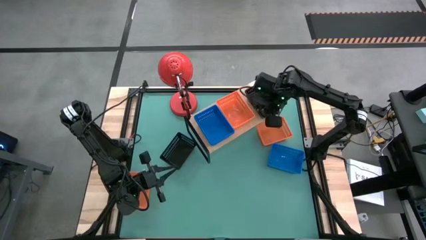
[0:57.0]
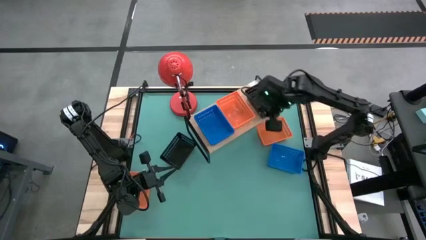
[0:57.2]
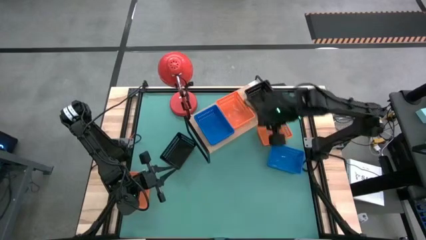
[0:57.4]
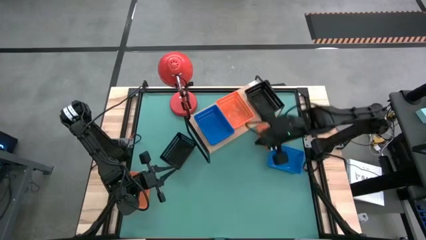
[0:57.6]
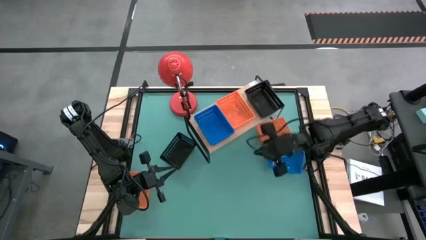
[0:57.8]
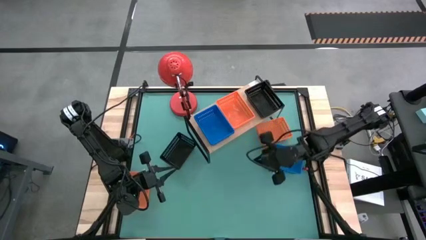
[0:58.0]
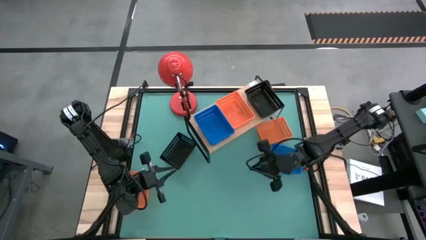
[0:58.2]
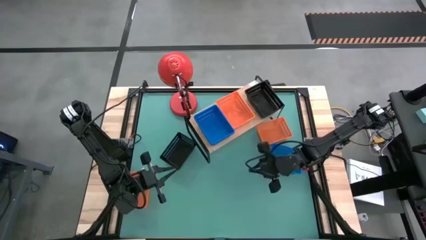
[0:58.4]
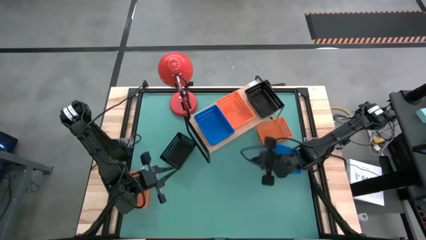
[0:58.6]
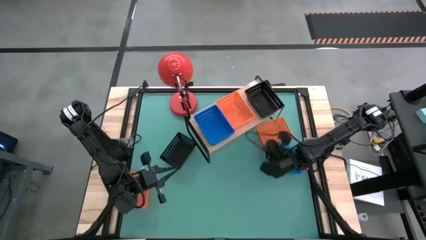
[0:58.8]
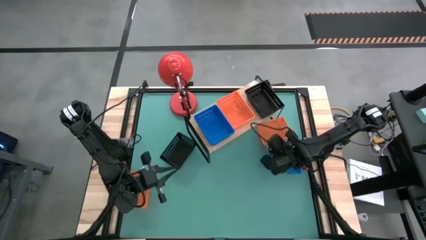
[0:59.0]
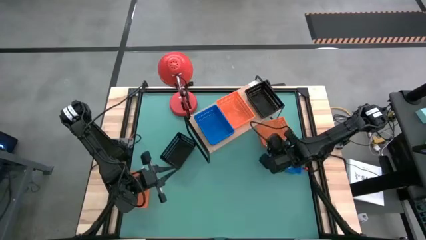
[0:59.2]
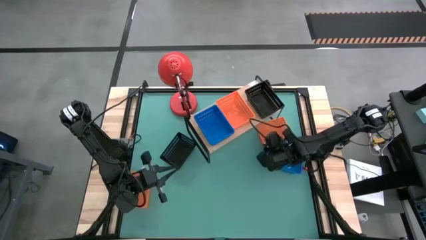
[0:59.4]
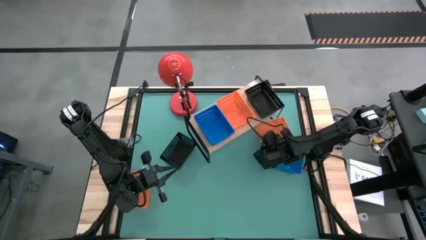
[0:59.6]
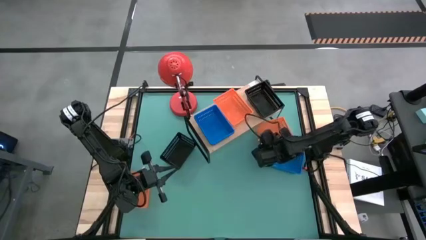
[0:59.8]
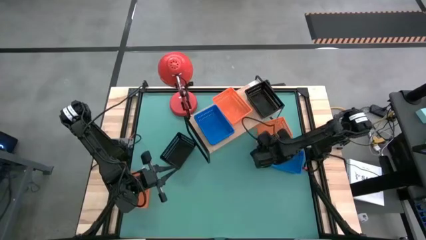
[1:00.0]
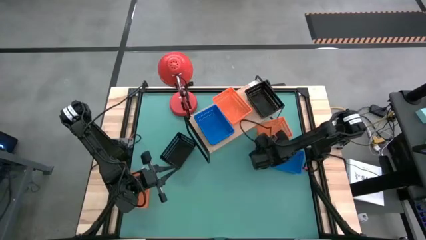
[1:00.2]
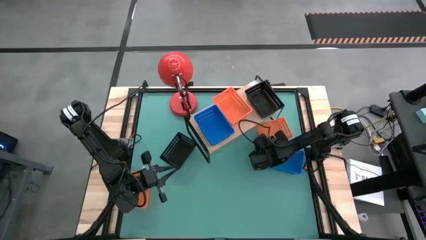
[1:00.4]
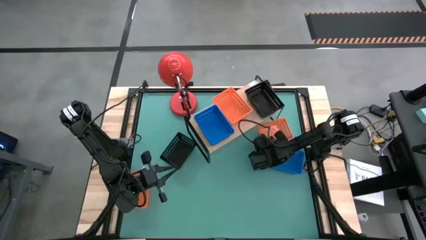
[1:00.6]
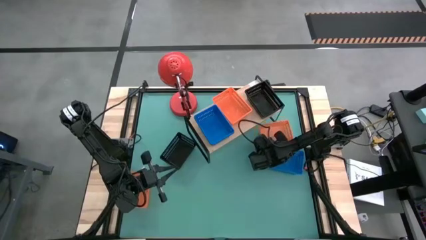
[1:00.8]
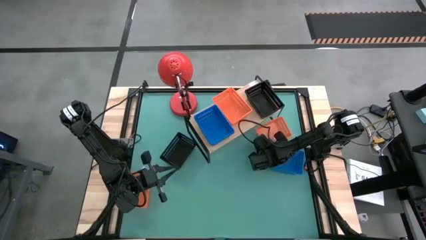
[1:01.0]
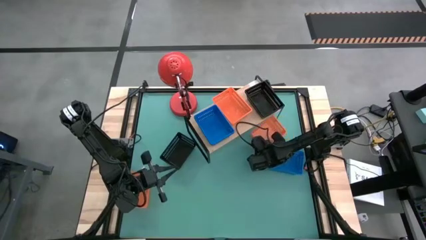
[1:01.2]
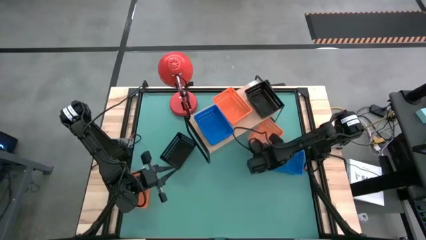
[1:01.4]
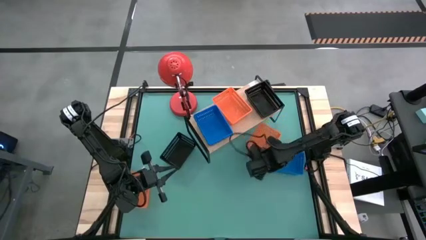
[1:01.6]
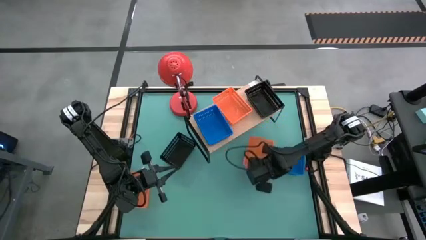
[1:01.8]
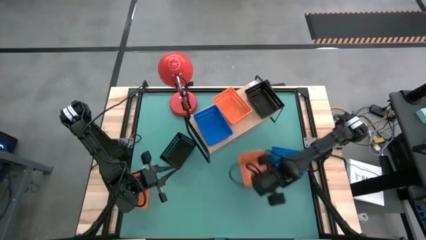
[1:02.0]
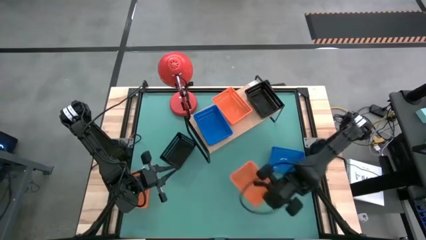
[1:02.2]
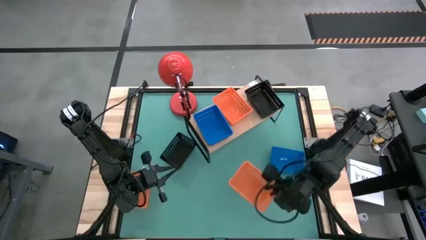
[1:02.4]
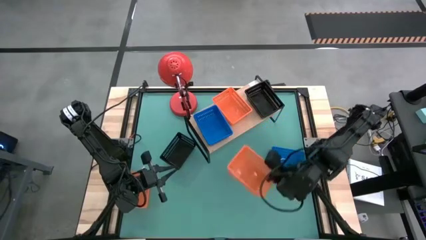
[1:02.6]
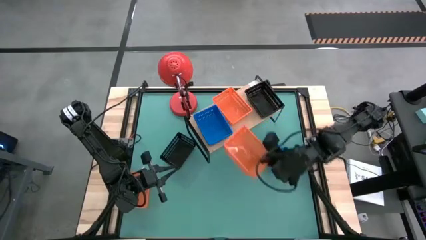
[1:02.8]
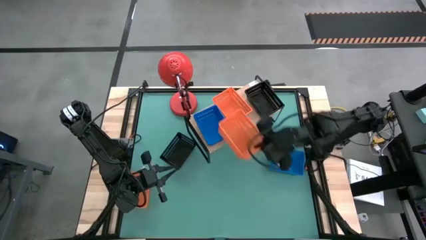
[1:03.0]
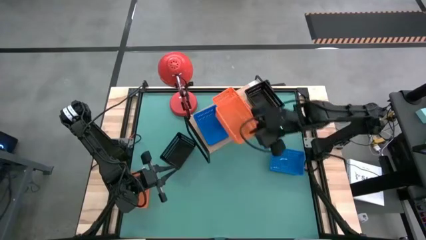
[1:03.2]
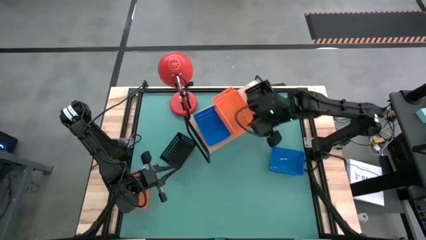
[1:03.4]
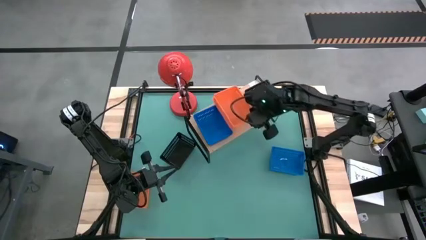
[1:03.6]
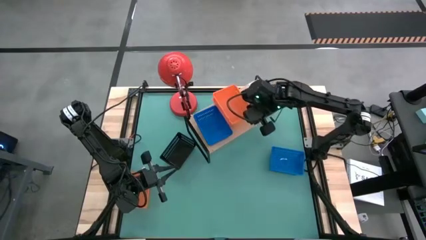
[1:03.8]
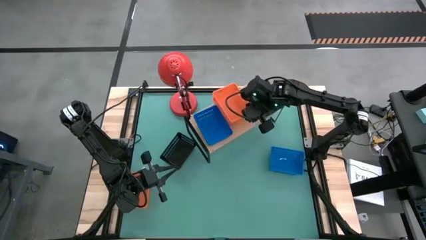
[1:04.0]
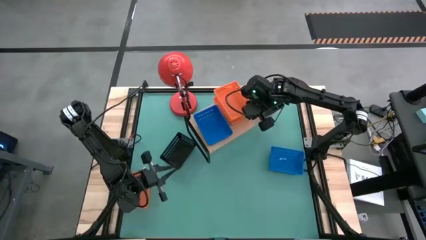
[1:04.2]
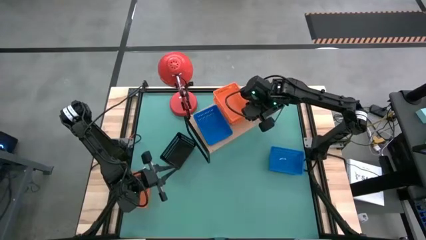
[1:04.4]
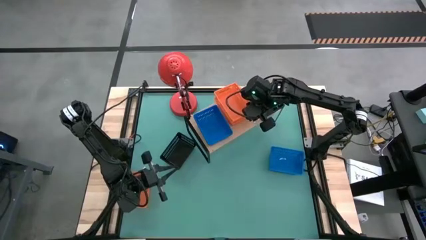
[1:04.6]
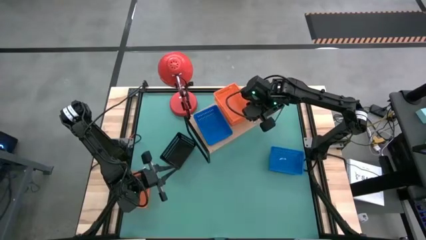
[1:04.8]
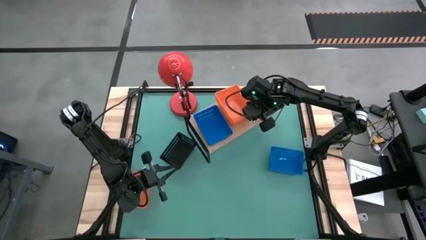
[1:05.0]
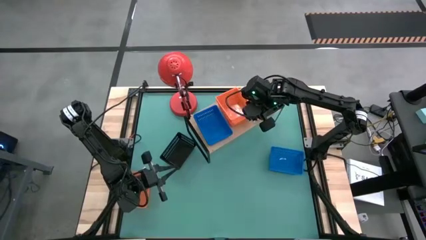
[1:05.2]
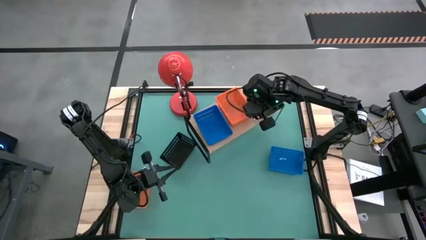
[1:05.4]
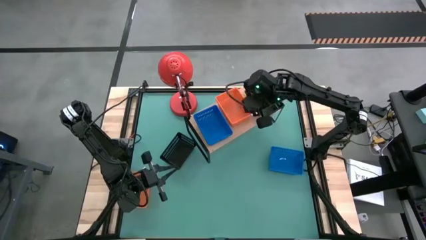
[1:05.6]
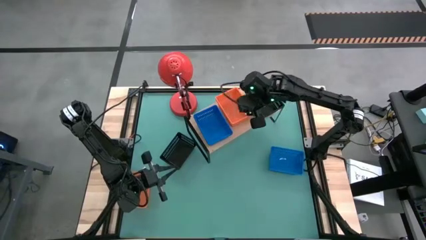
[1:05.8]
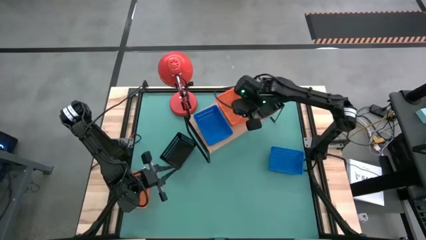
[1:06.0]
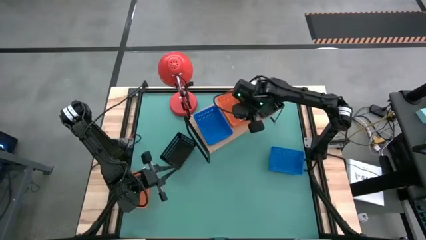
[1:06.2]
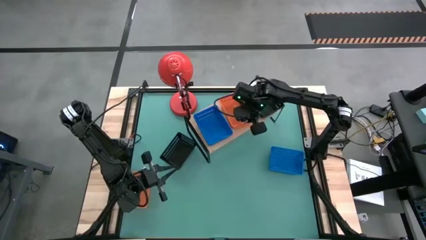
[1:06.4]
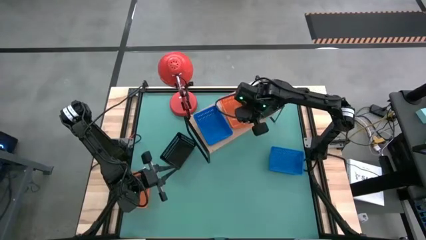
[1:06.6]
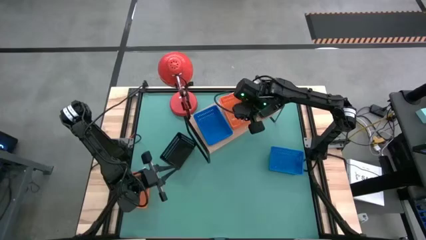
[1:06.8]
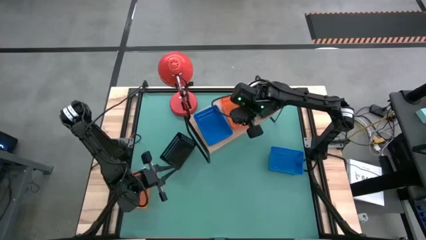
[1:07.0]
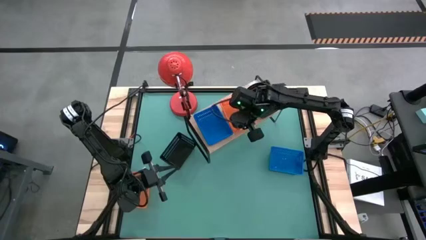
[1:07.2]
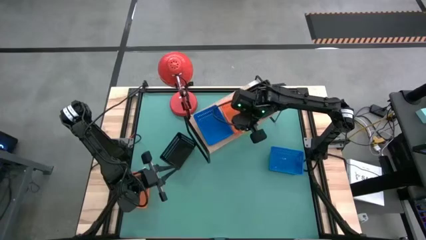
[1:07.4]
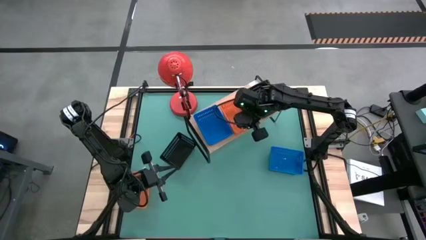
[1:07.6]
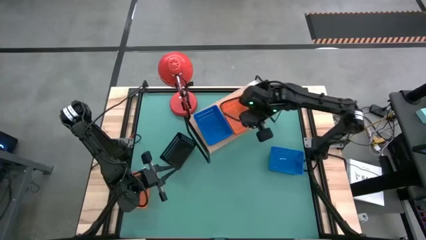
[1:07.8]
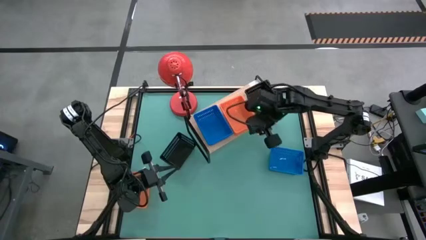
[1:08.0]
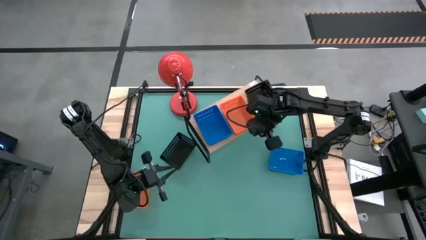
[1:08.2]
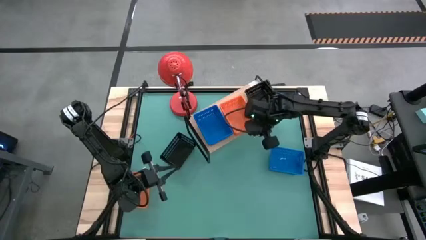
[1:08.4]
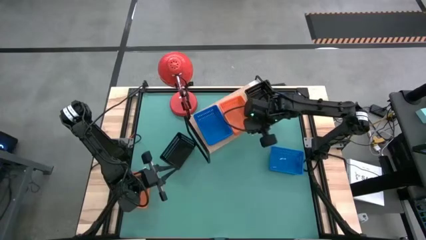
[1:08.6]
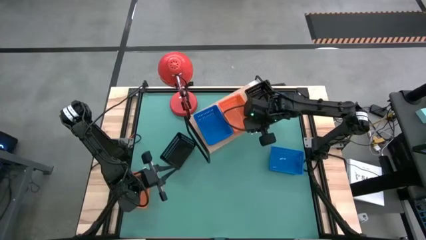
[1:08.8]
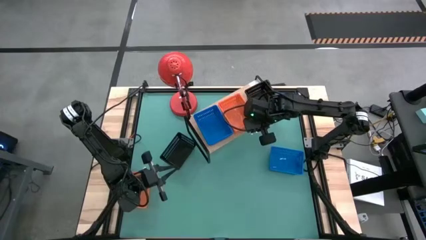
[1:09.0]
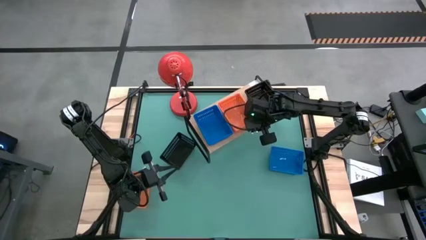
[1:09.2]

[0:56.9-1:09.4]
Task: Stack baskets on shelf by color
Stack the right orange basket on top of the orange basket on the shelf

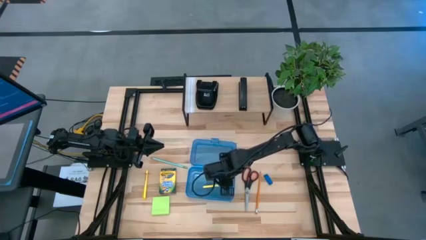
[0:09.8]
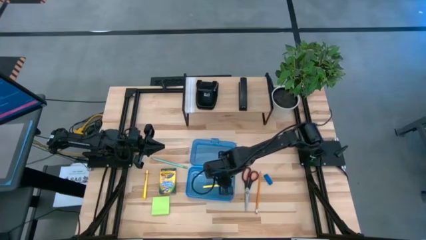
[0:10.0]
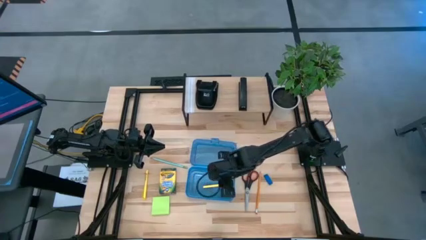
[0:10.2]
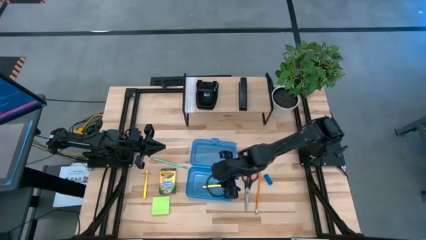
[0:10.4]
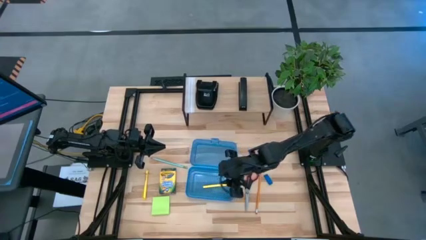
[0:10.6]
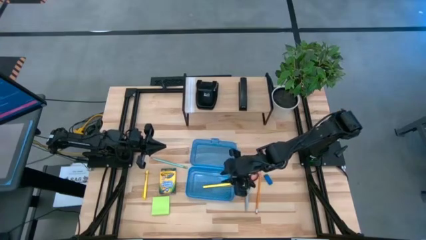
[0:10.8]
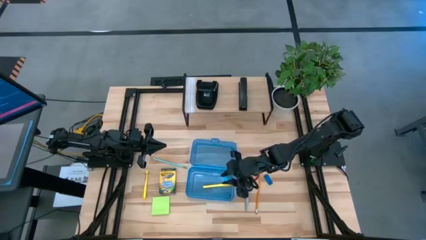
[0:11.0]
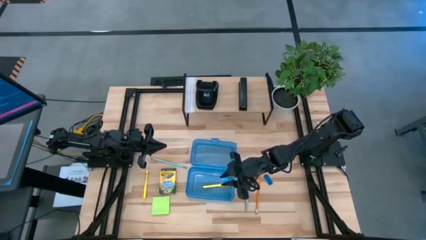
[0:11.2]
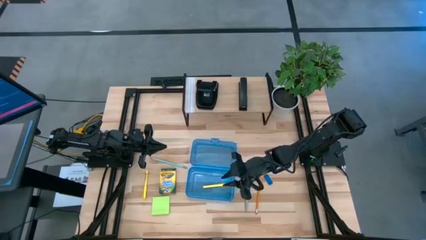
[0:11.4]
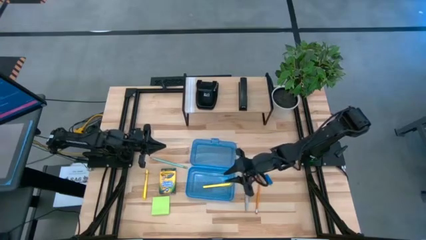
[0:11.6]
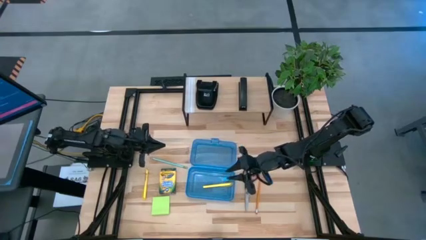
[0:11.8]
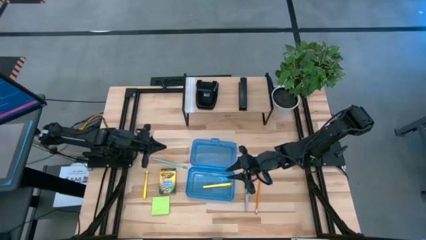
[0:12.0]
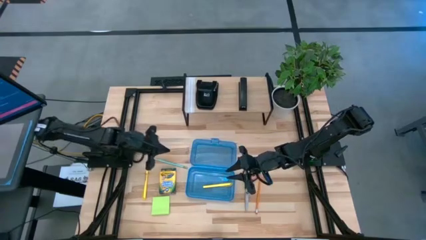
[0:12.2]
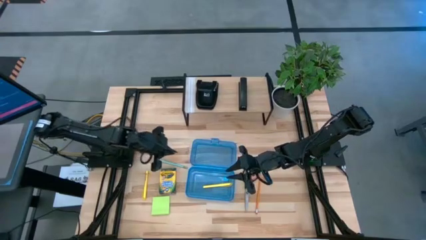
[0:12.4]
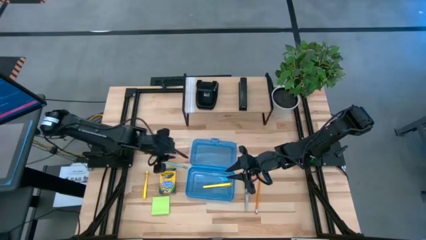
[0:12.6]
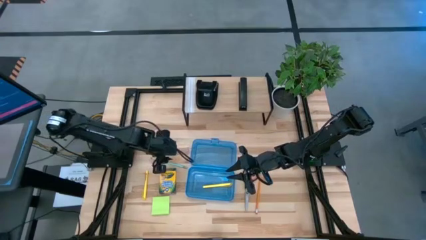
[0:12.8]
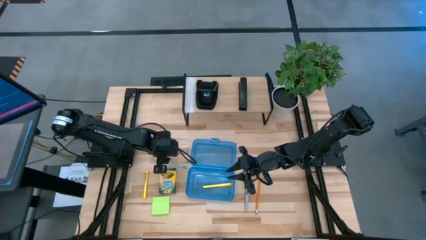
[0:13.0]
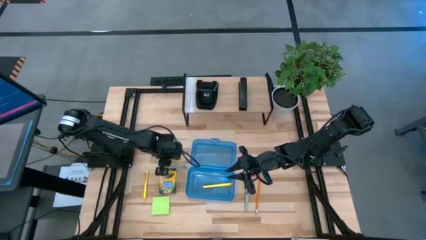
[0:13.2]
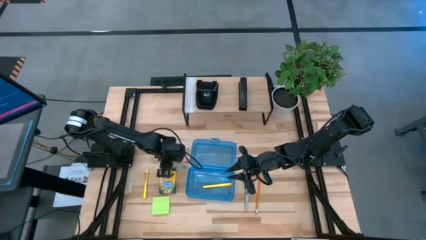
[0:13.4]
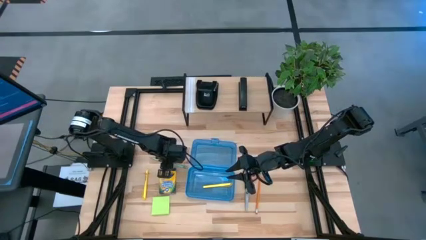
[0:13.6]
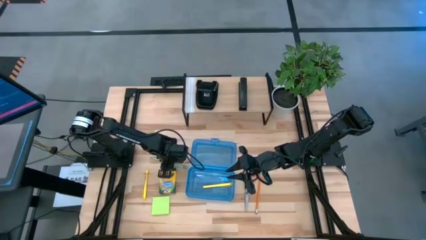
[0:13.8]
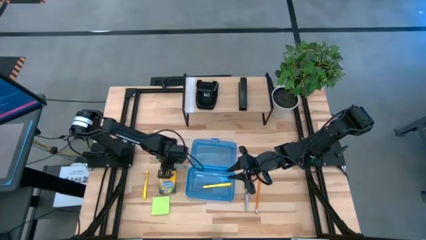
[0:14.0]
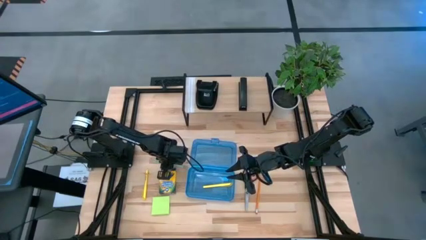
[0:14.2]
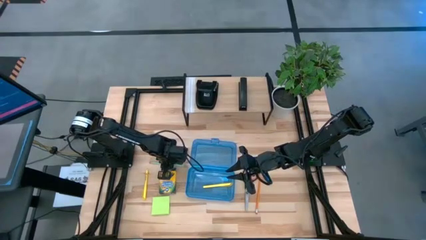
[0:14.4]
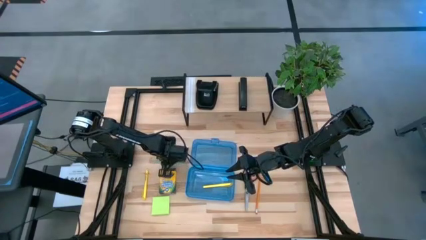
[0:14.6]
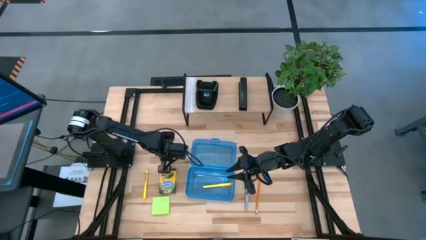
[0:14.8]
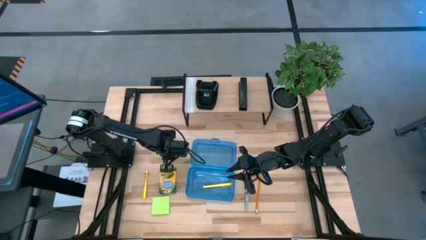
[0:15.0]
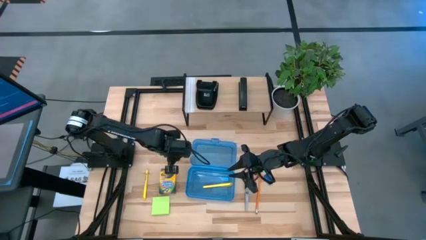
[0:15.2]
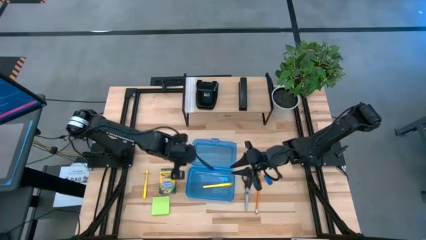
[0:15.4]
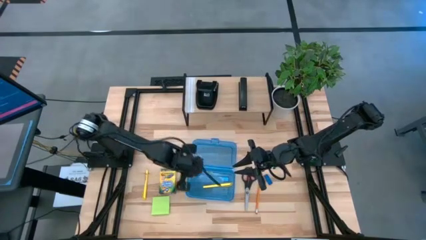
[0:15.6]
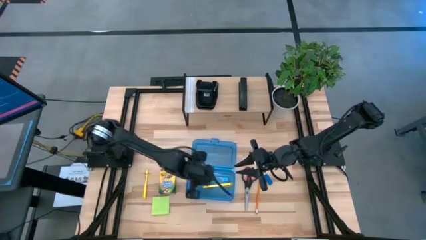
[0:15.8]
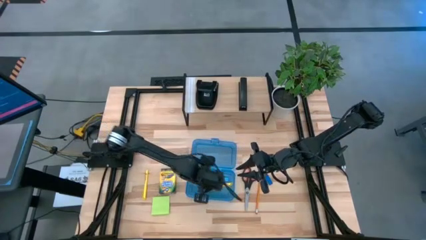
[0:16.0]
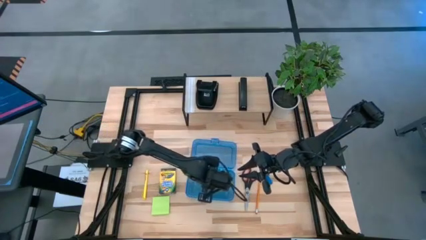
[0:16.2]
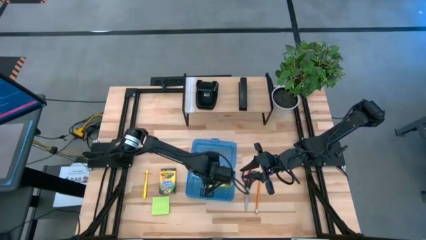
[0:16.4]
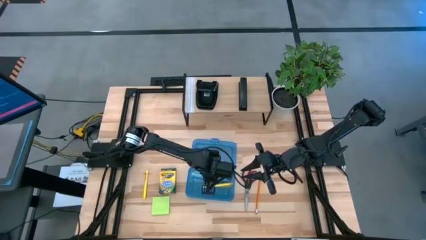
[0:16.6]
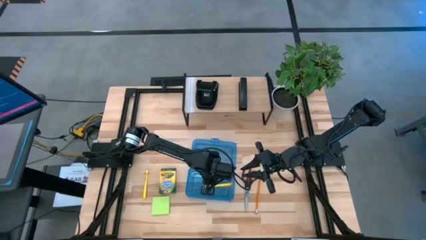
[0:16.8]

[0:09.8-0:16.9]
Task: Pack school essentials
Put the blue pencil into the blue supply box
